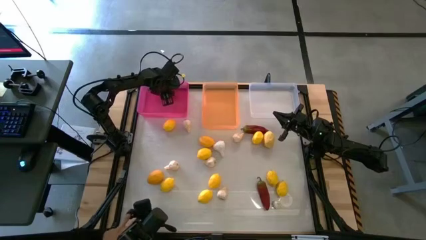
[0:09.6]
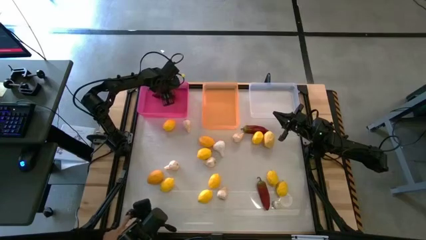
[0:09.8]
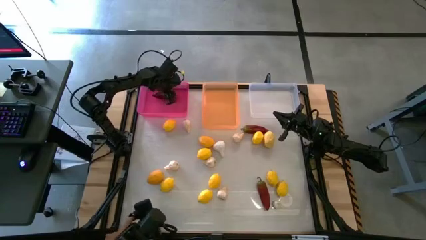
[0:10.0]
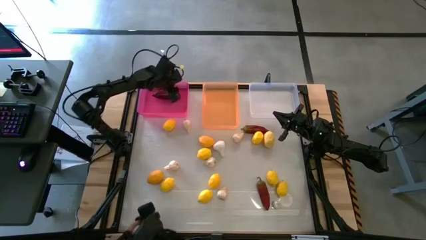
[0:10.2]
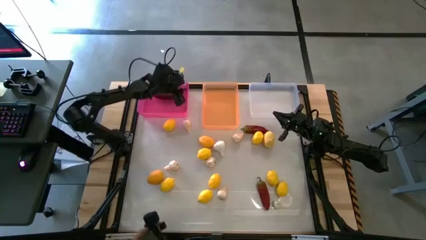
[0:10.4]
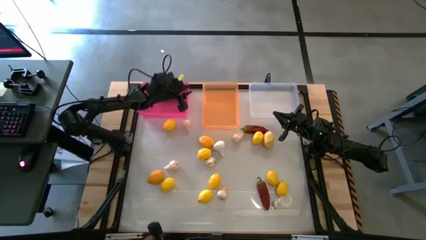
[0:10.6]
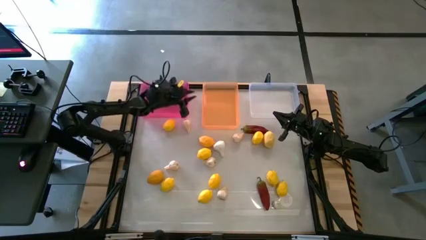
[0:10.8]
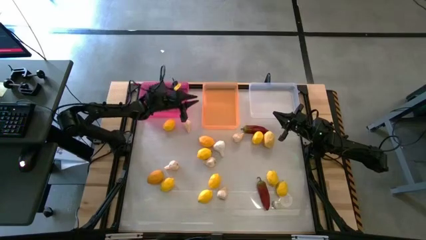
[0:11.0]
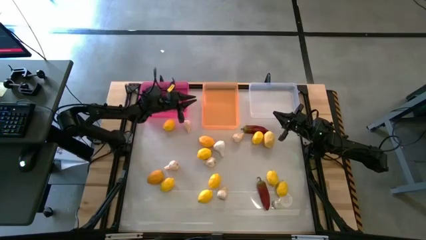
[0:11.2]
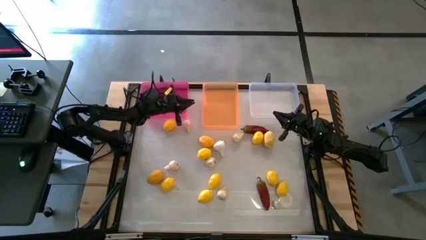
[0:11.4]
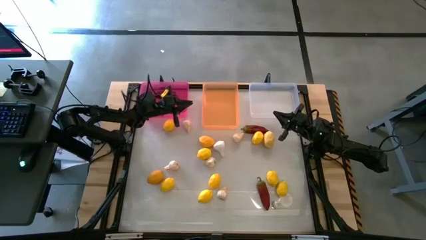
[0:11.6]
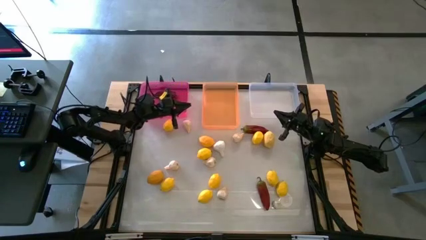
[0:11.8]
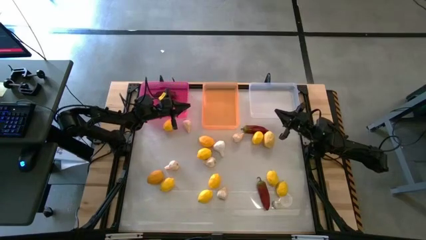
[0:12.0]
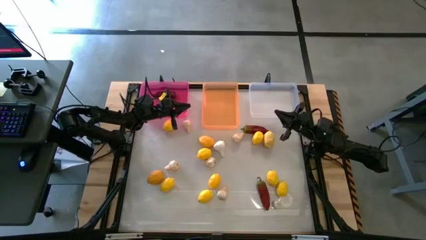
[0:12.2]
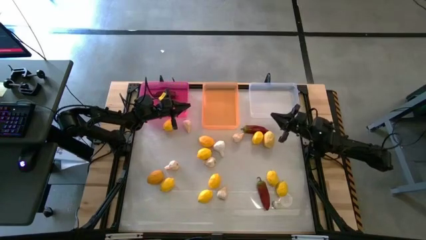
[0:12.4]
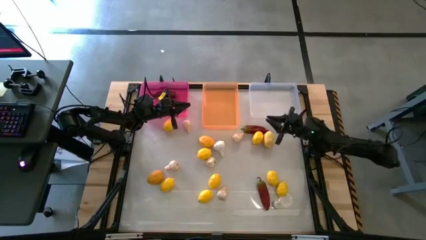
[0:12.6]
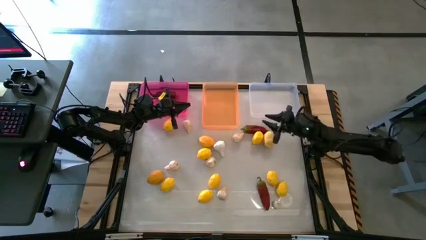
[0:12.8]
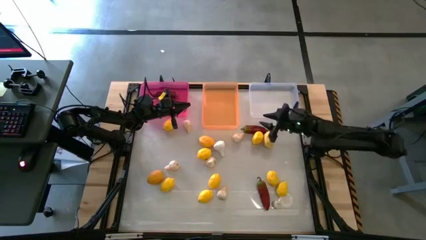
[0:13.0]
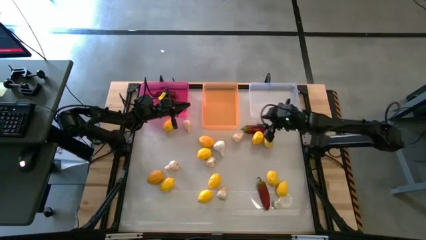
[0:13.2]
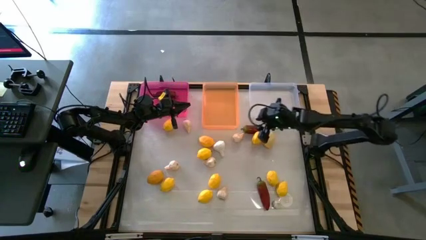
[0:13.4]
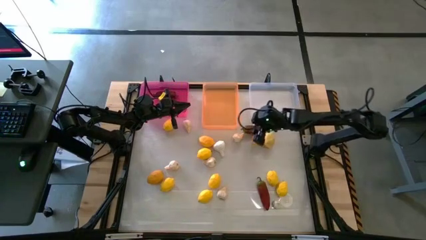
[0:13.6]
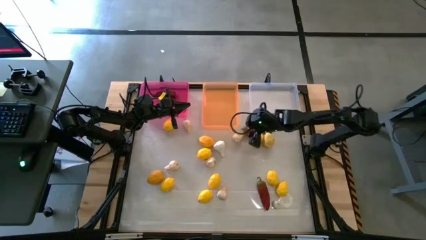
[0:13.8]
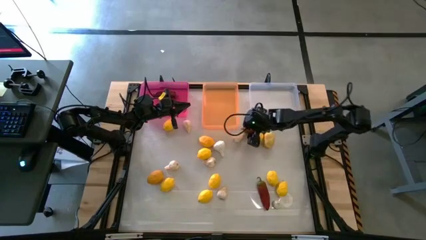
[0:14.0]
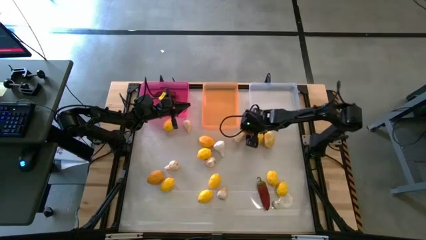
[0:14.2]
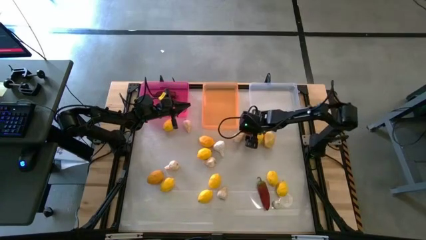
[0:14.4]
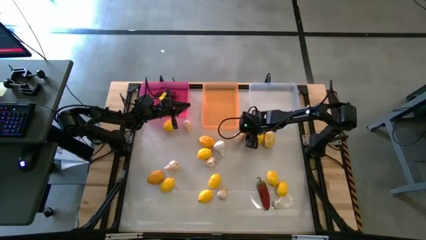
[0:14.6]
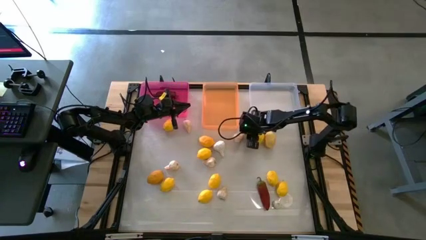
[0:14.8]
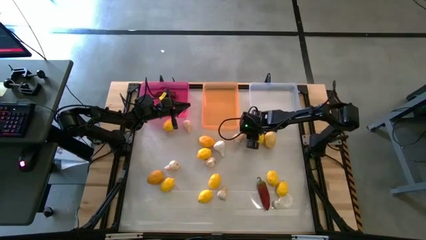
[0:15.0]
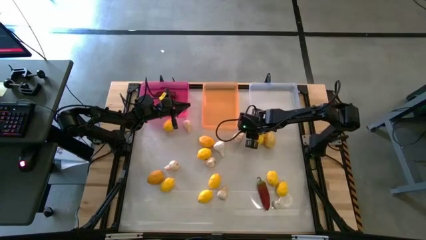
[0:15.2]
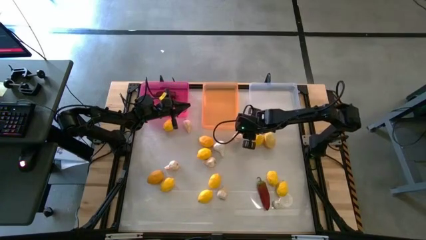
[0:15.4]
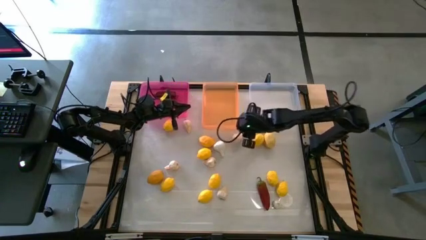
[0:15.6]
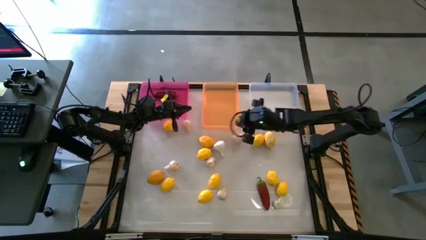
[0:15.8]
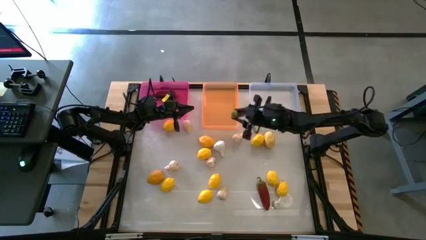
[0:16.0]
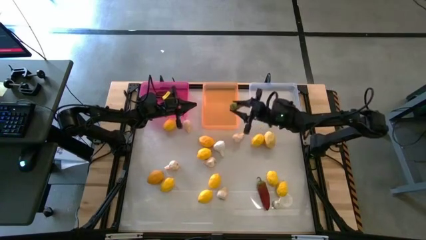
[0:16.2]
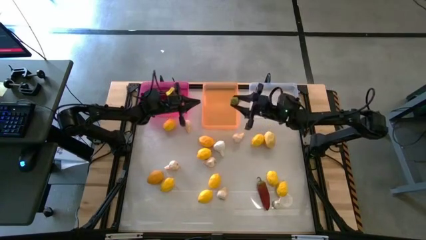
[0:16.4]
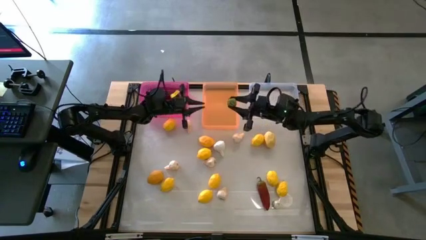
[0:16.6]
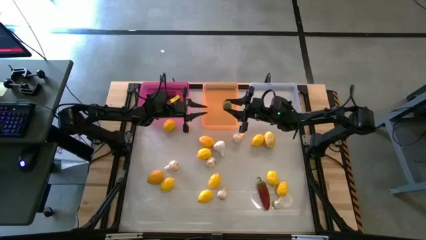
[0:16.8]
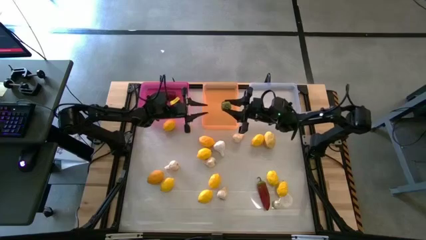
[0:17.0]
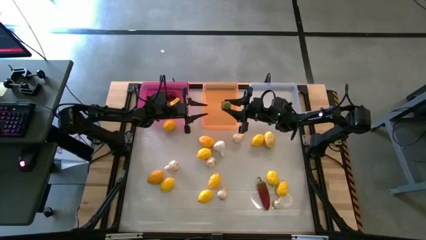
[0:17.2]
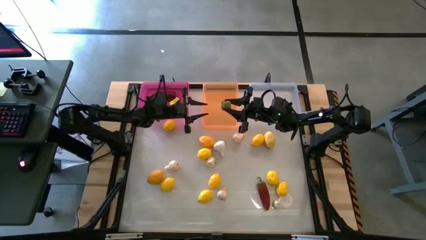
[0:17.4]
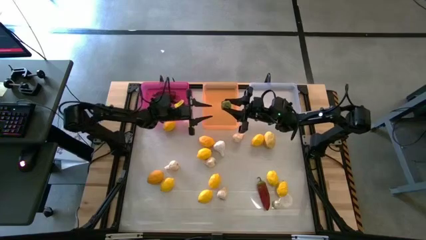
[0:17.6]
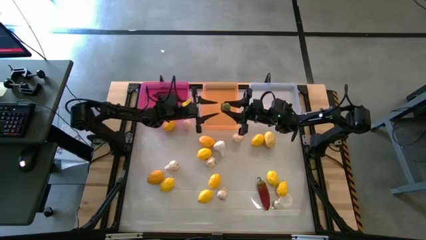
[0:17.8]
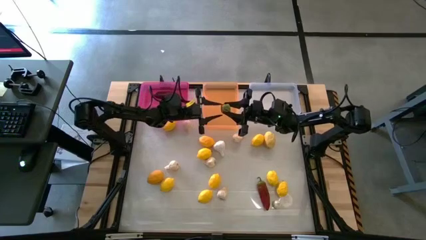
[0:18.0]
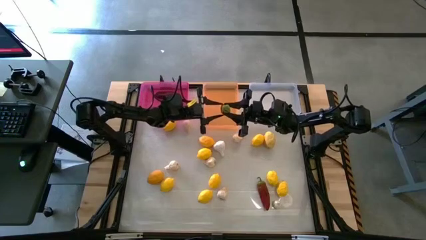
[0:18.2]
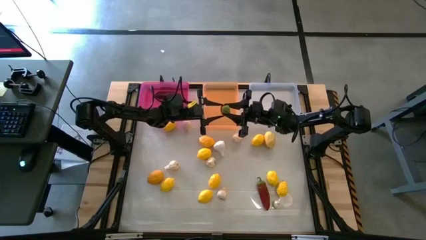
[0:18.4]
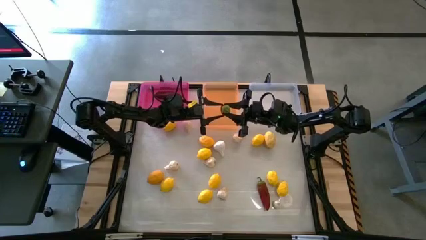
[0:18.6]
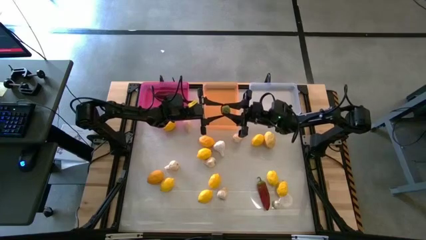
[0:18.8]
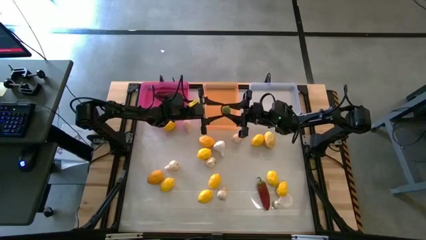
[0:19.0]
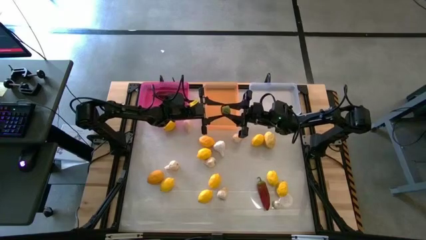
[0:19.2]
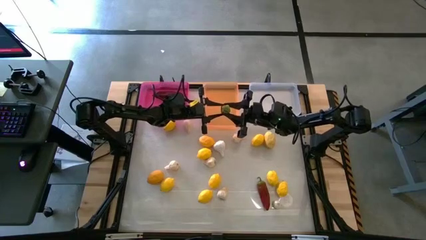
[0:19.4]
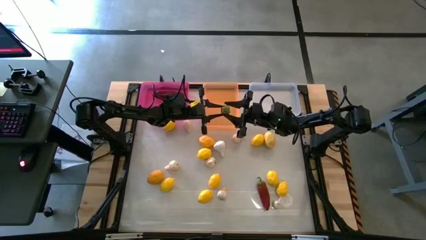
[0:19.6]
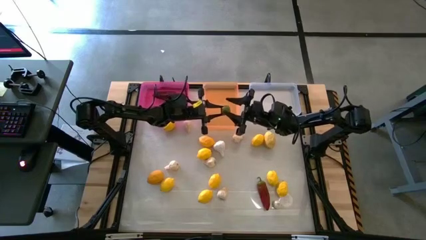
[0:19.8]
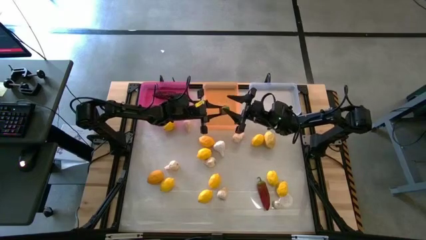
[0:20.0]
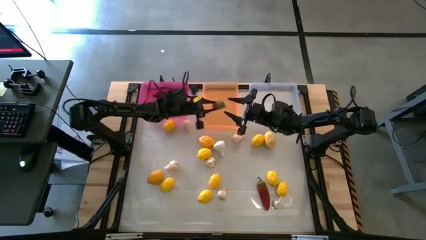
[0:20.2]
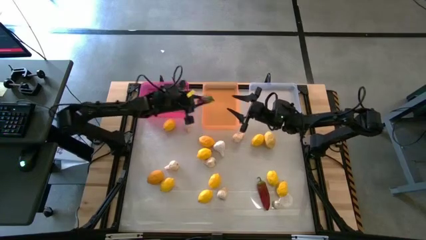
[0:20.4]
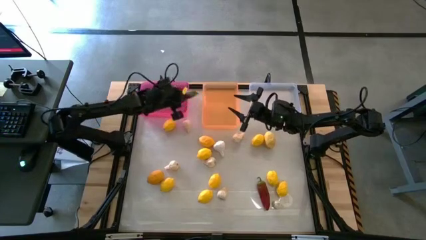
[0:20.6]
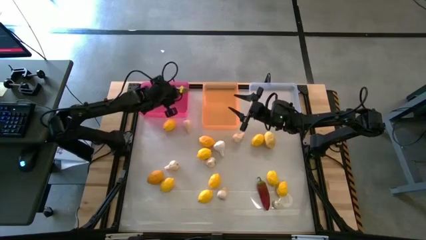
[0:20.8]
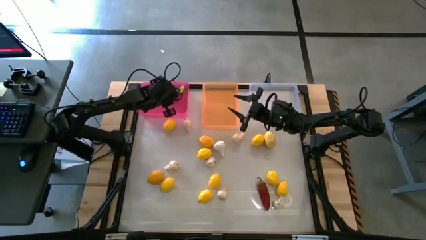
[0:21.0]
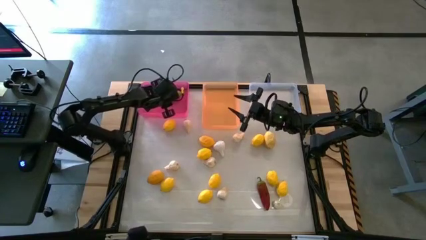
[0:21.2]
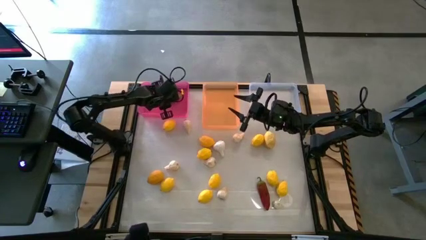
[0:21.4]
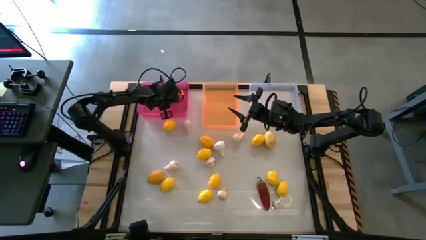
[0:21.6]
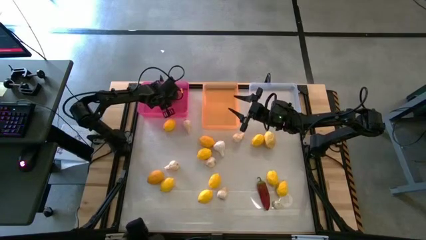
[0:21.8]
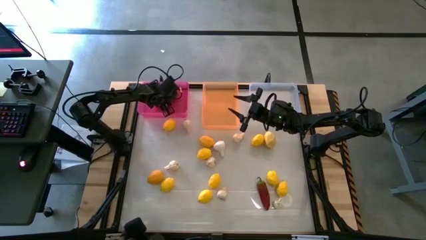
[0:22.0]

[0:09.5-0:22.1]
Task: Sort produce into baskets
Put the red chili pepper into the pink bin

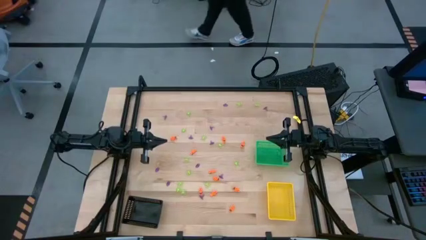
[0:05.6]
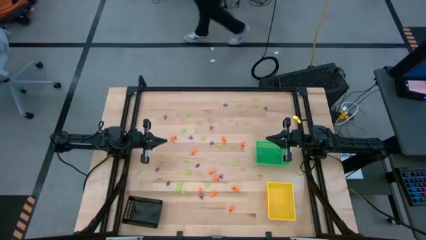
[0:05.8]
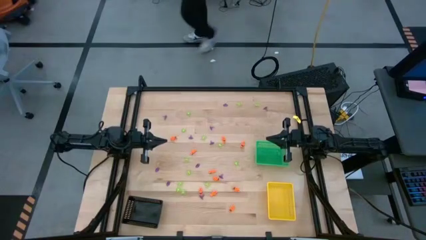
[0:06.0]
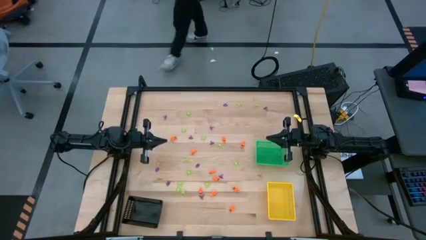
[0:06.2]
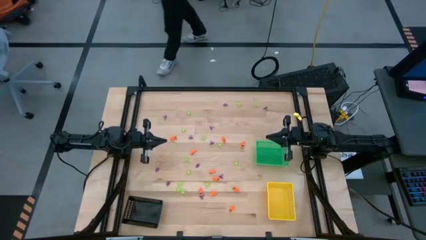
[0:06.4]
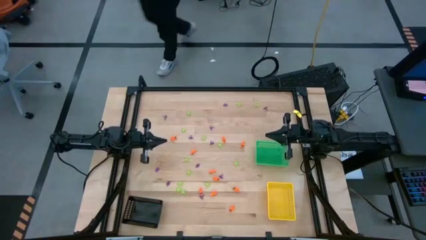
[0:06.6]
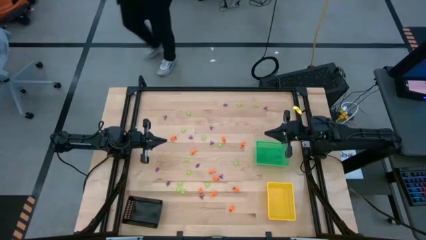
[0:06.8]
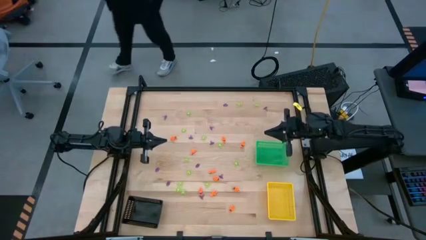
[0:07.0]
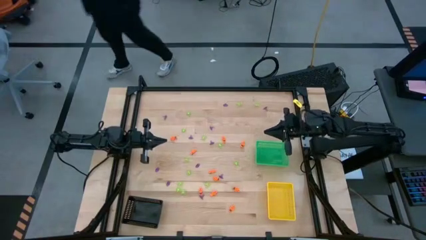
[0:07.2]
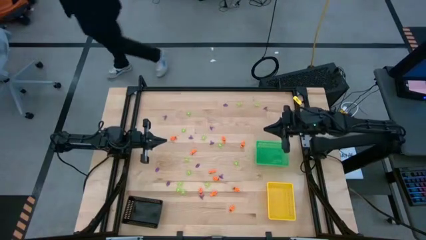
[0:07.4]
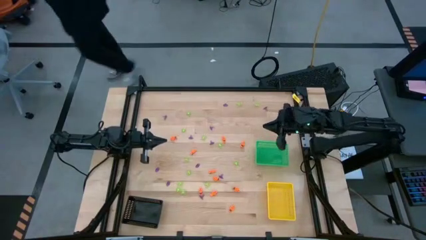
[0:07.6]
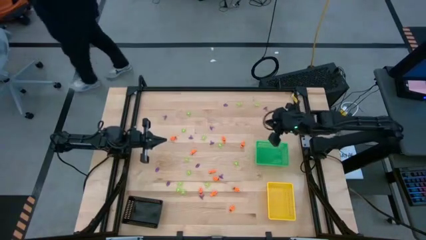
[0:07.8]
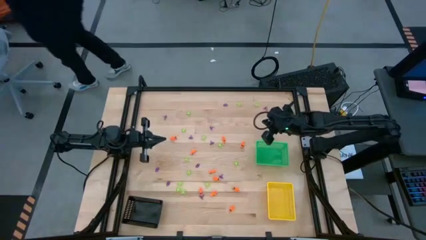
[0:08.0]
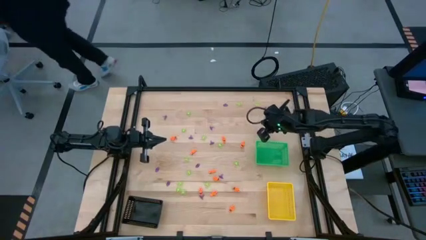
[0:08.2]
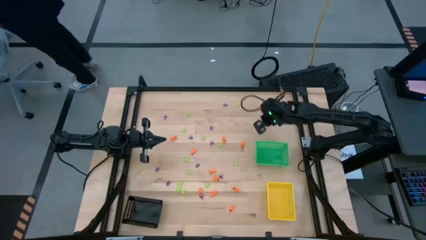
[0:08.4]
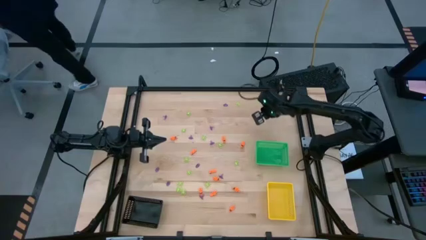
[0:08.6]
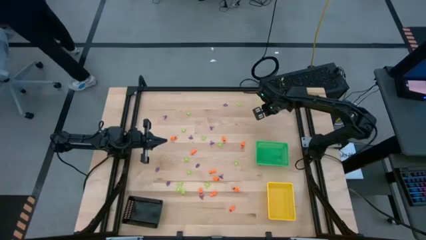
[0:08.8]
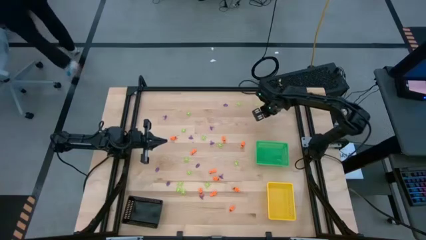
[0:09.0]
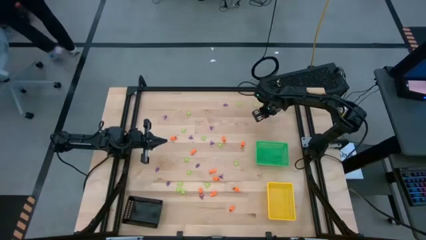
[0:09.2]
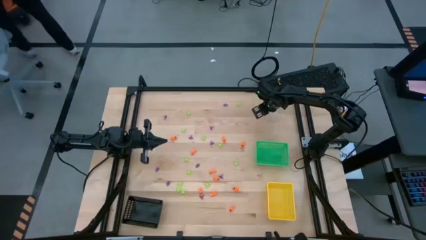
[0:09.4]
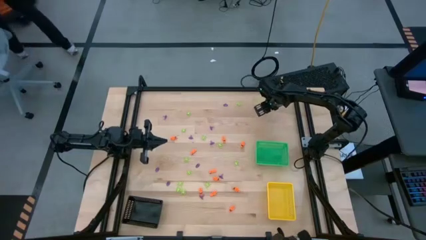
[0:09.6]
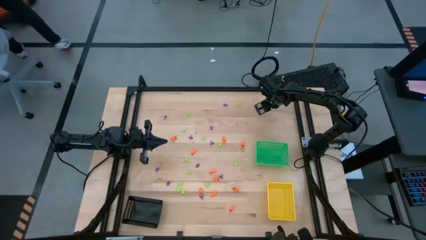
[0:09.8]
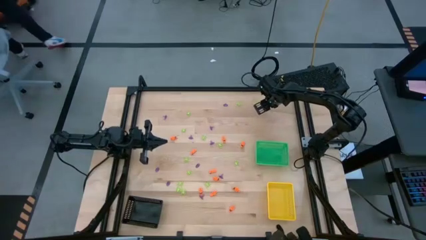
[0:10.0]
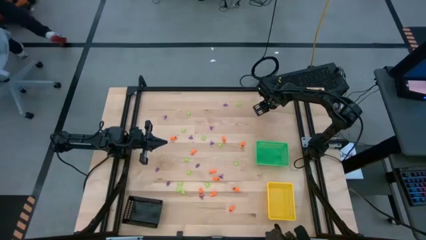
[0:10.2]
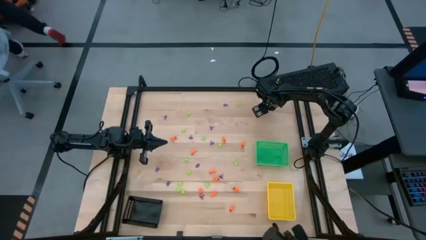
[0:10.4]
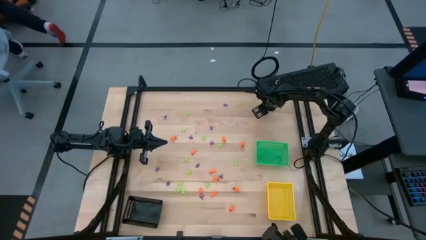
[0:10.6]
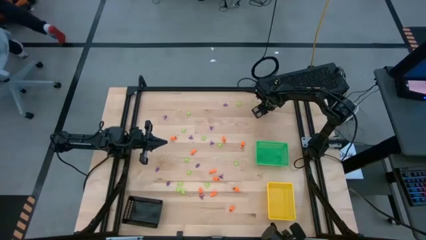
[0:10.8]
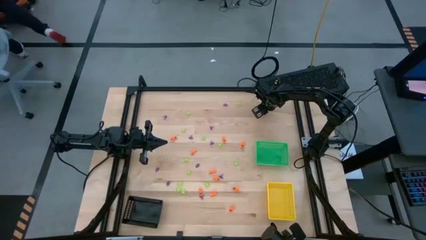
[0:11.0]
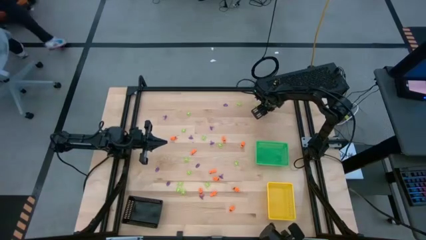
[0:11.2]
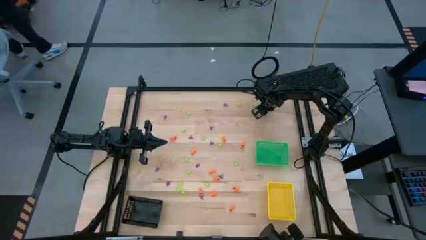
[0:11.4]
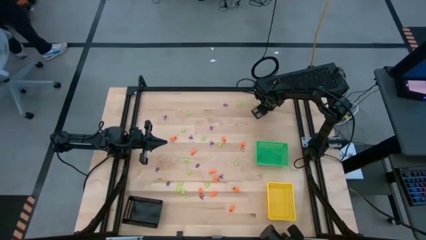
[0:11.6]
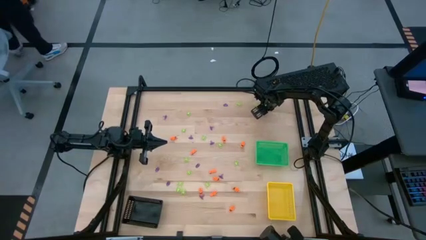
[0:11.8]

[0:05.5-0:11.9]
Task: Sort Halloween decoration
Put the purple witch hat toy into the black bin
